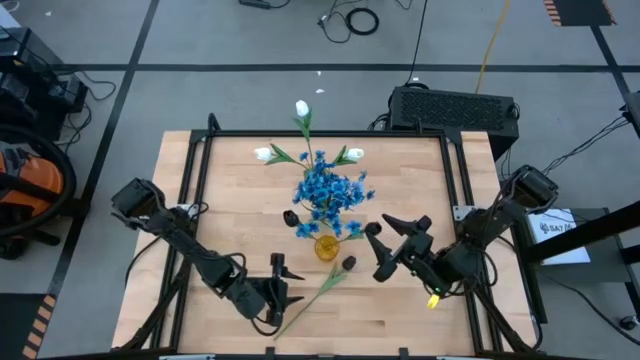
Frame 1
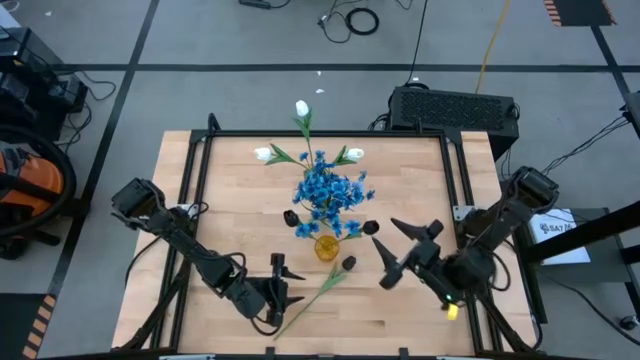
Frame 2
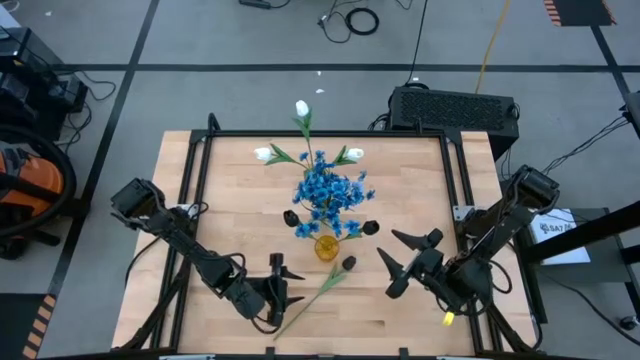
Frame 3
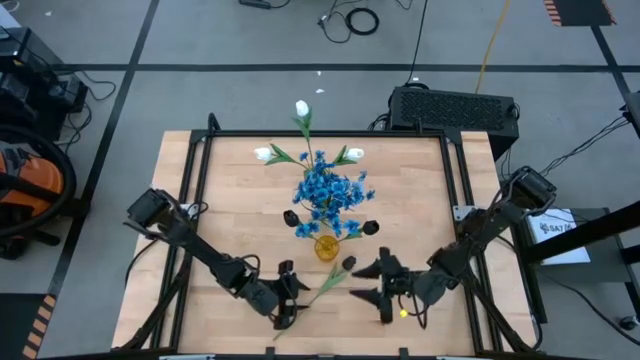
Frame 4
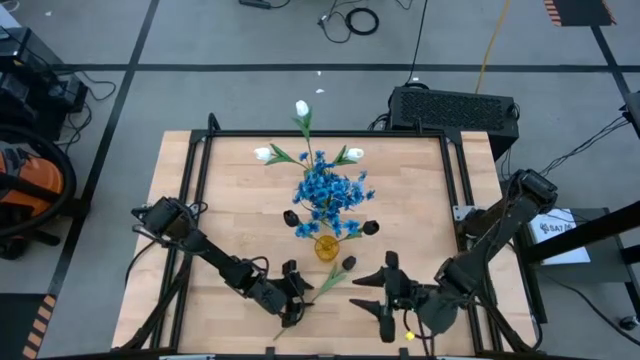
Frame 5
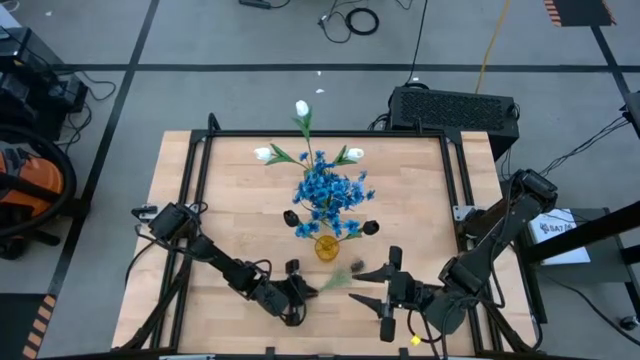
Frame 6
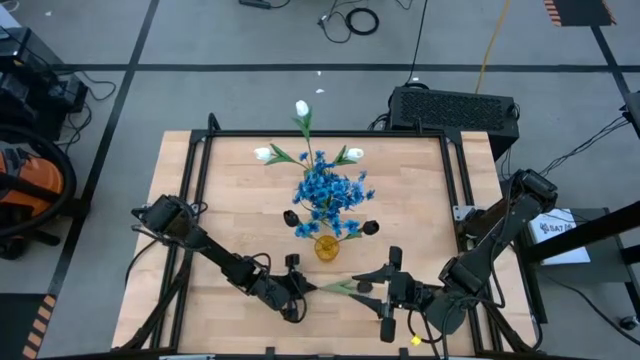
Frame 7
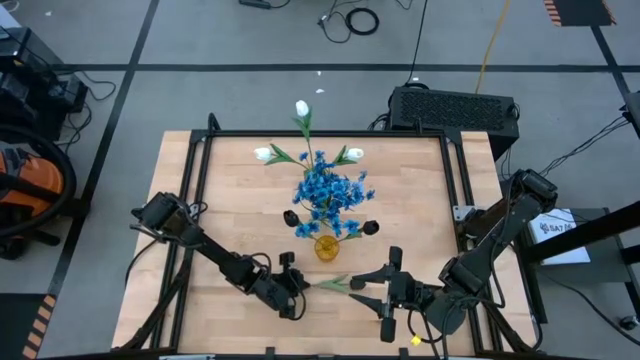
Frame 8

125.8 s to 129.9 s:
Task: Sort flowers into vase by color
Put the black flower into the yellow vase

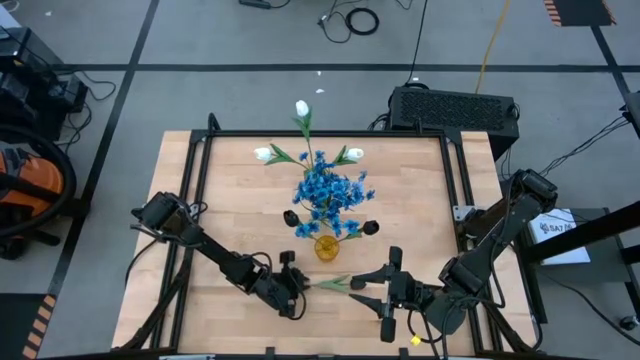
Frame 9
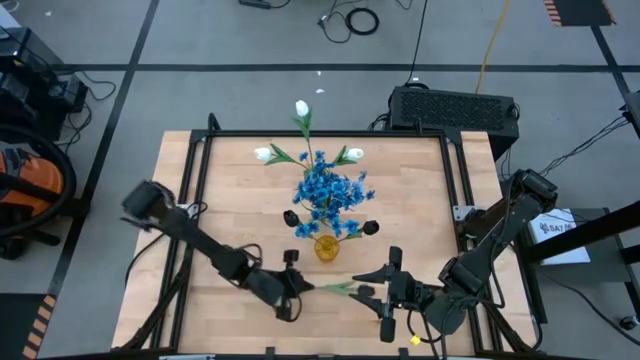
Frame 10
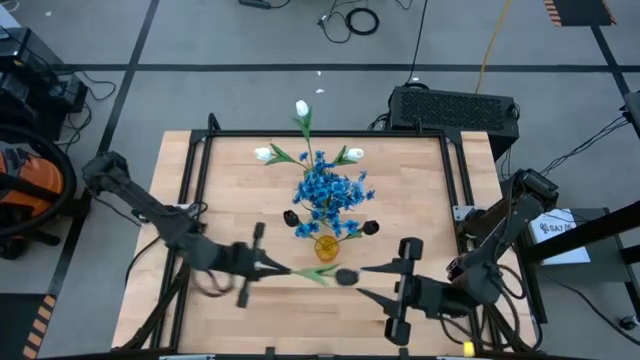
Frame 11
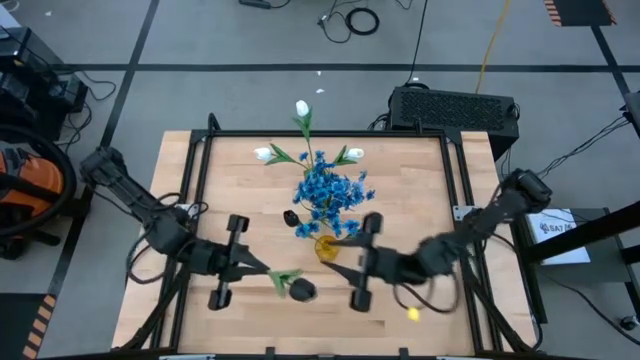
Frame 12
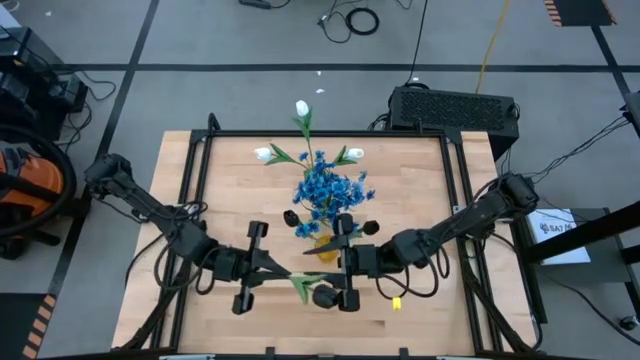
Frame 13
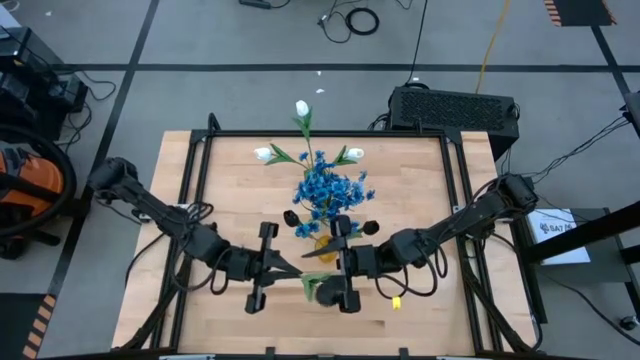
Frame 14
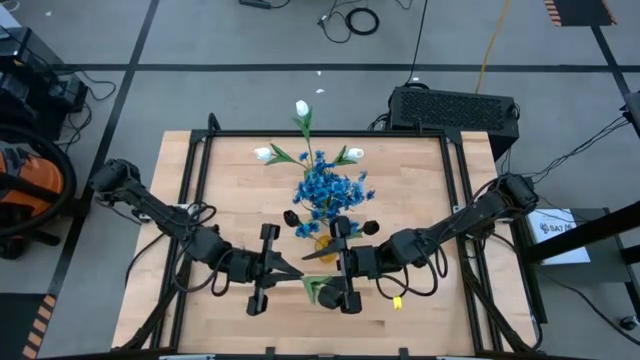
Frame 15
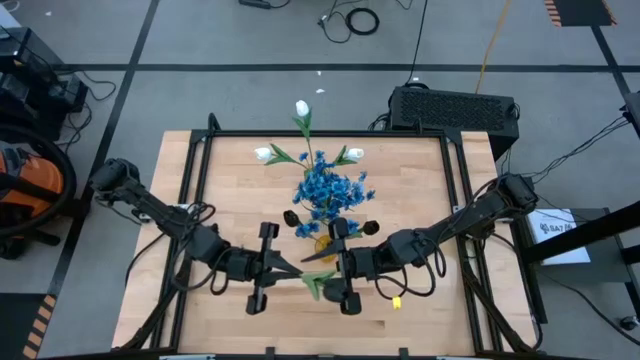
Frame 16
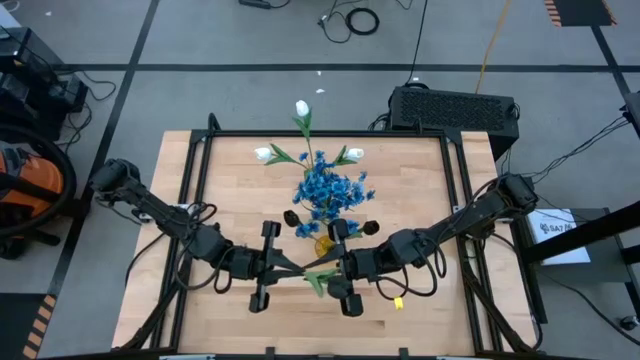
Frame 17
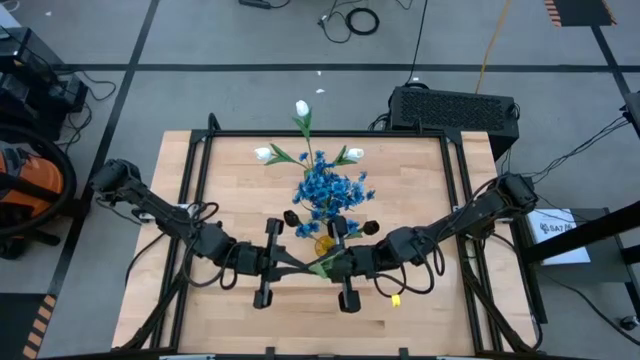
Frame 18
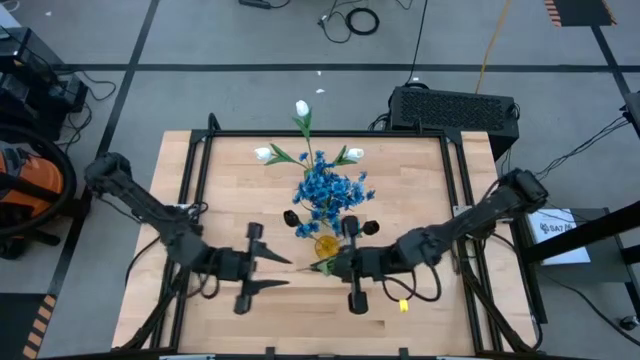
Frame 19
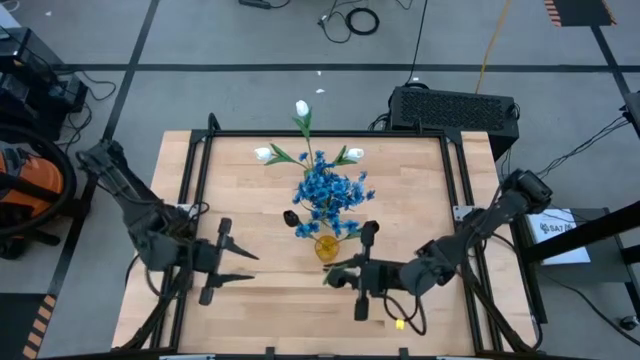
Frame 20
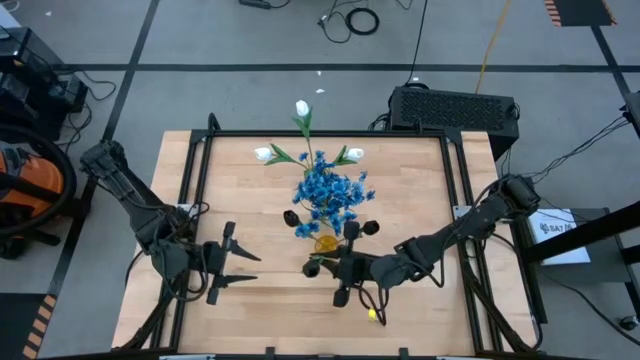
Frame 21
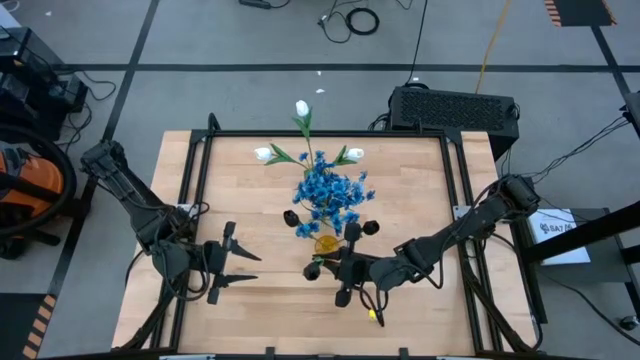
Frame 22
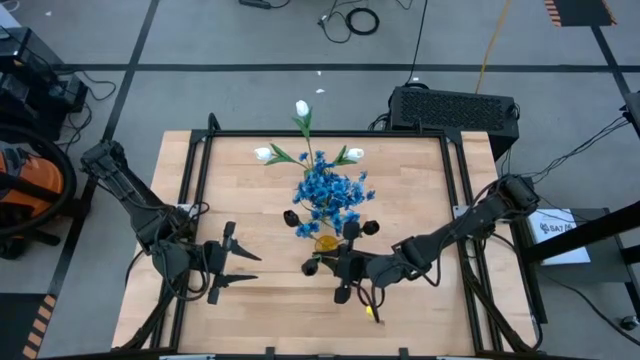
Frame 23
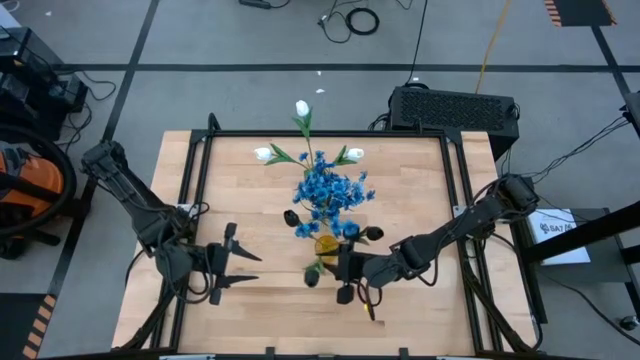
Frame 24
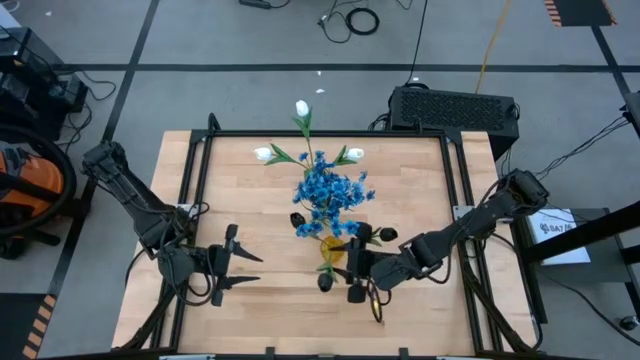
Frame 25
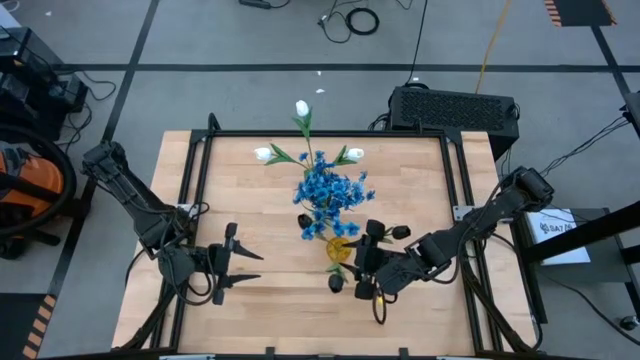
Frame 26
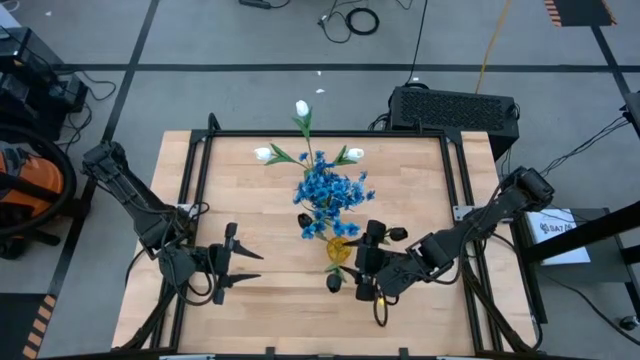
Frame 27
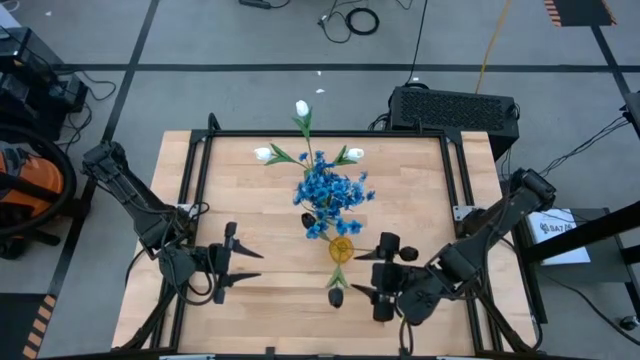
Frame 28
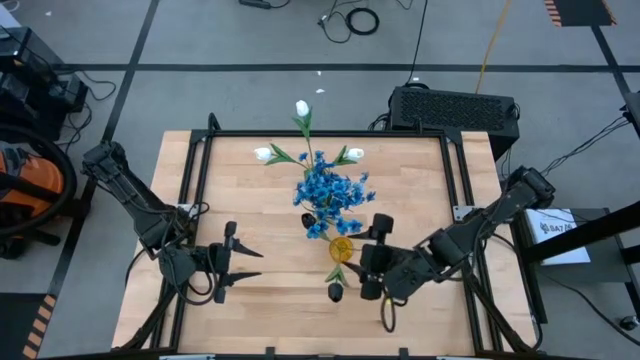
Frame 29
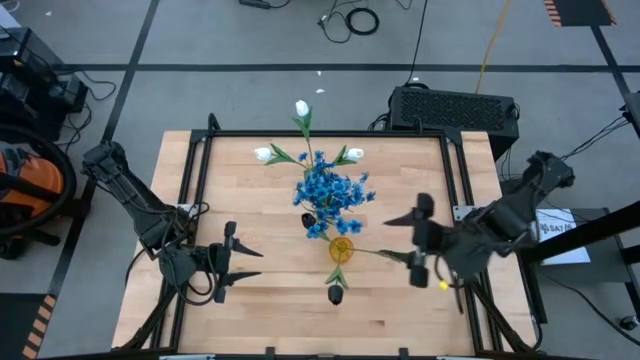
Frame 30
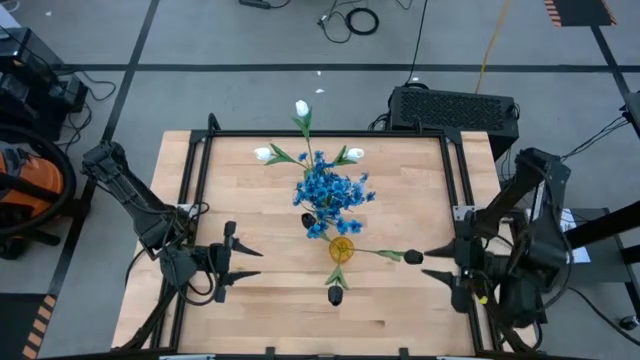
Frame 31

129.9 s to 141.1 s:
Put the black flower into the yellow vase

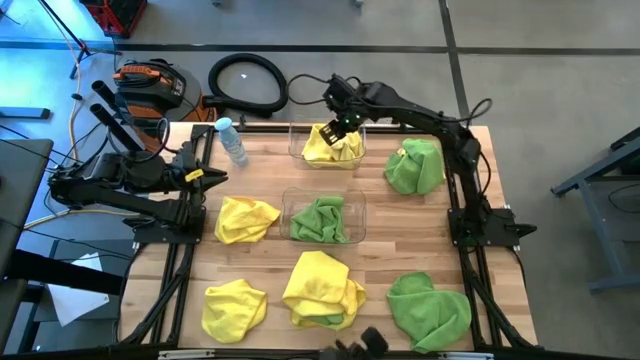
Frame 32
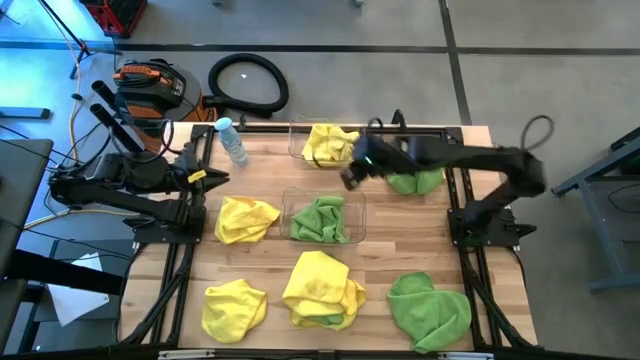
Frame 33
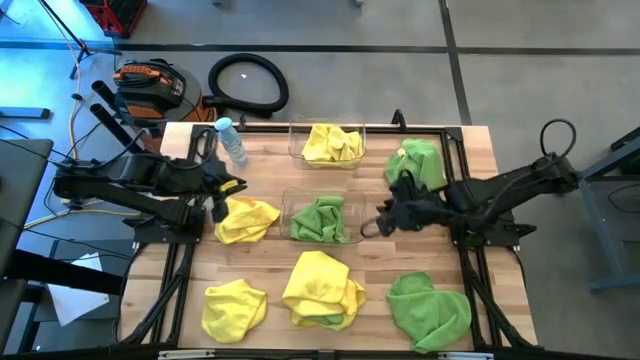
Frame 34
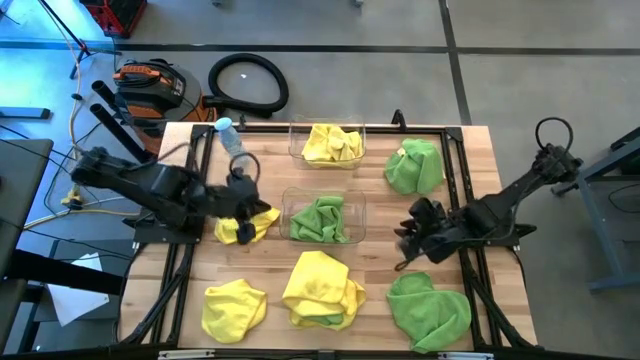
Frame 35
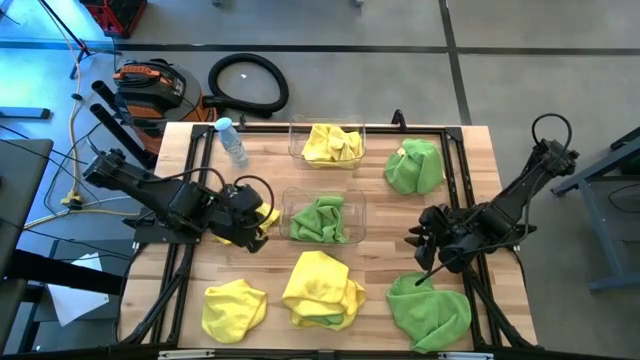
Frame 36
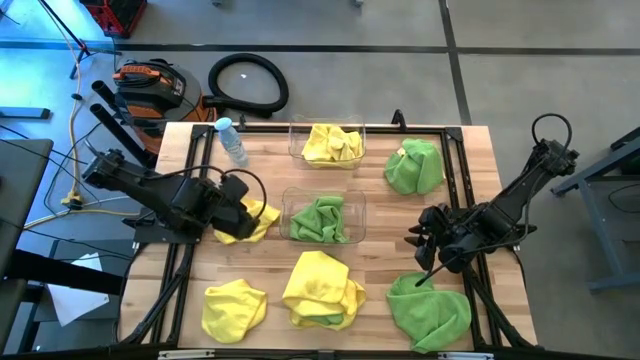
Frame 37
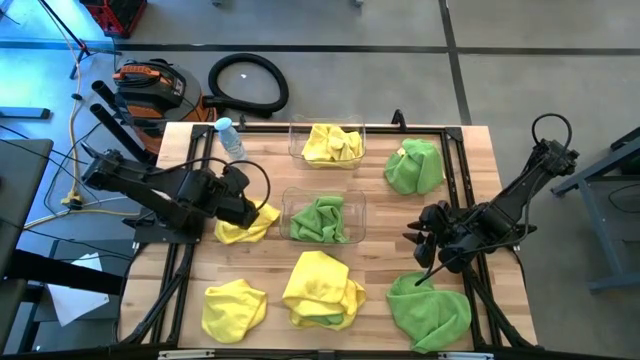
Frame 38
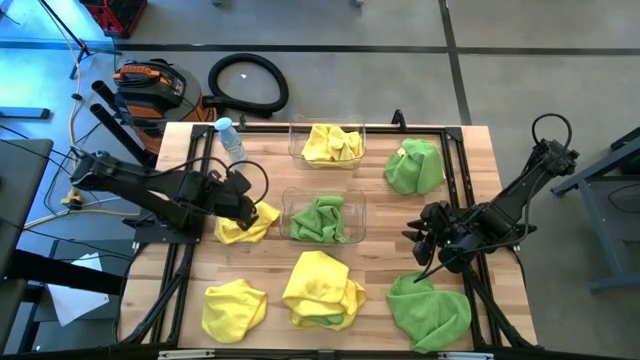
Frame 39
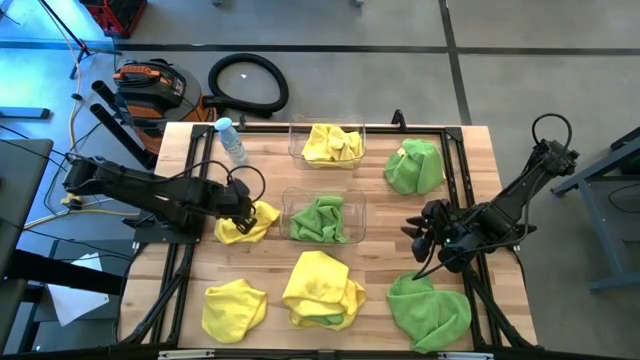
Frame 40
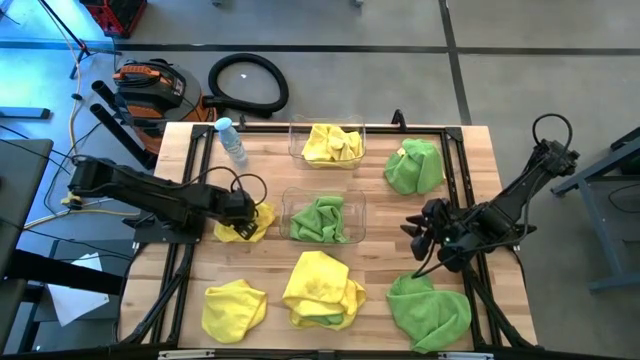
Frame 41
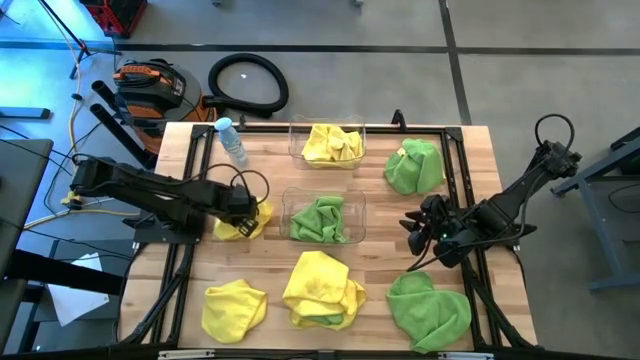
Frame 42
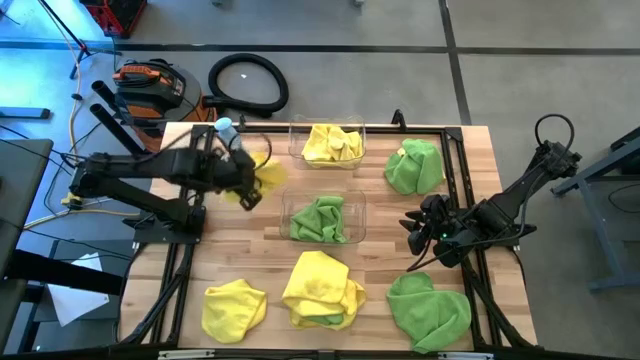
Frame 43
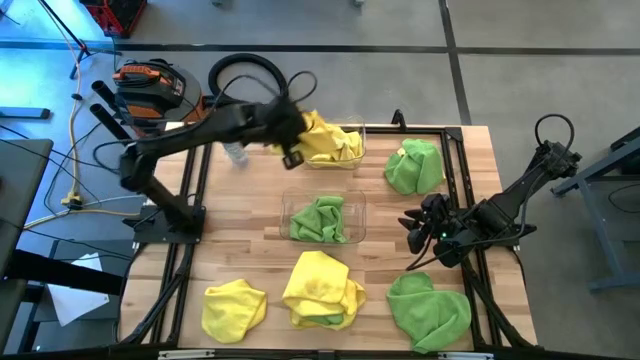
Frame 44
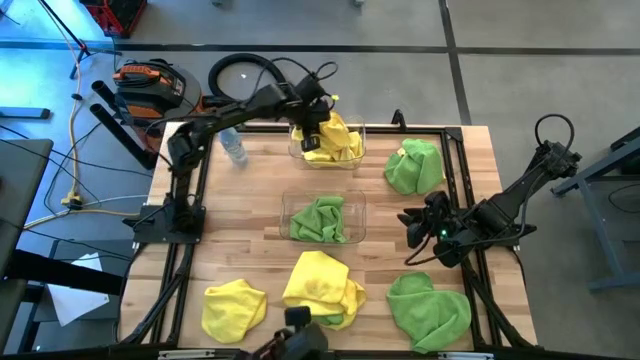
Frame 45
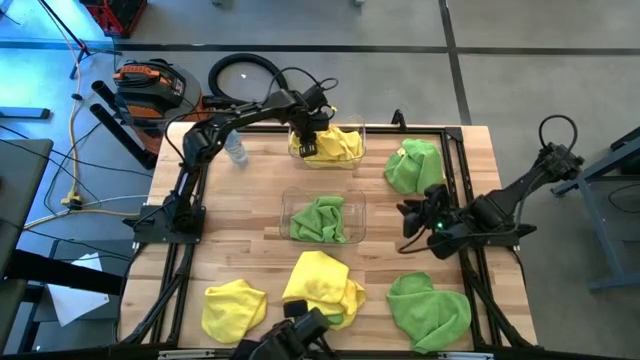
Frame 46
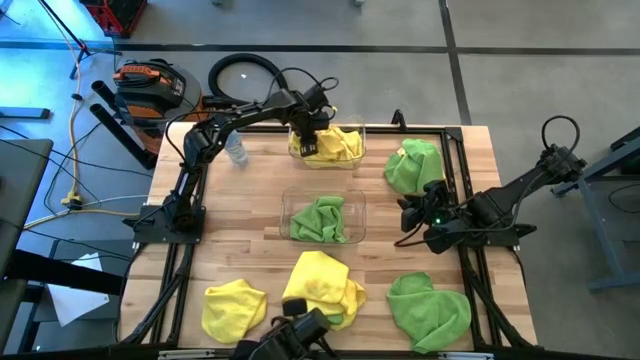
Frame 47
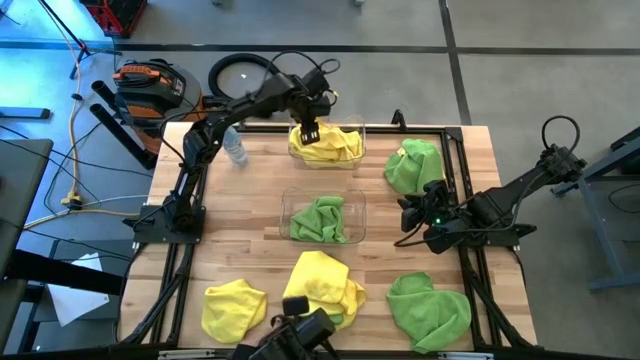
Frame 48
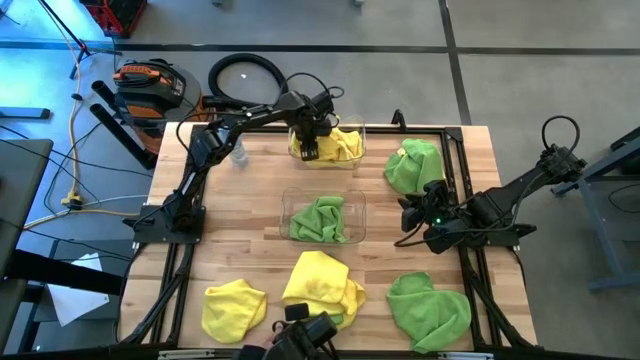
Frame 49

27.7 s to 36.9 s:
Task: Sort microfiber towel by color & place in baskets
Put the yellow towel into the top transparent bin
